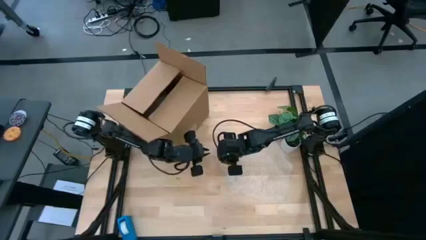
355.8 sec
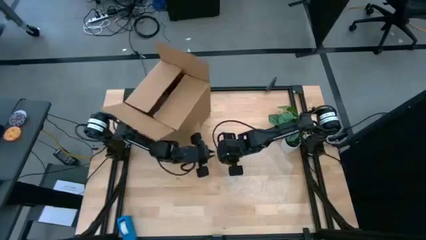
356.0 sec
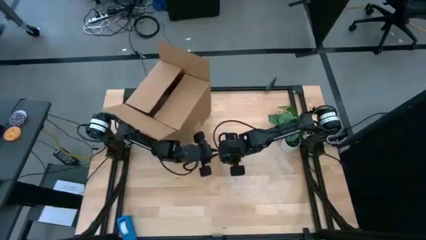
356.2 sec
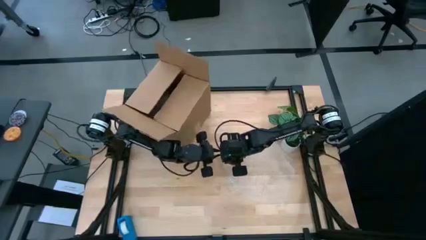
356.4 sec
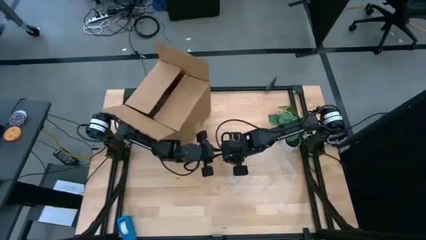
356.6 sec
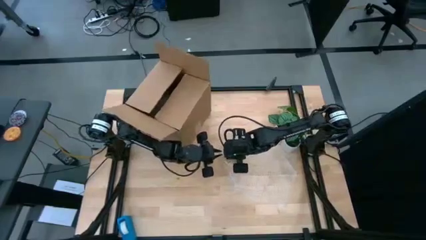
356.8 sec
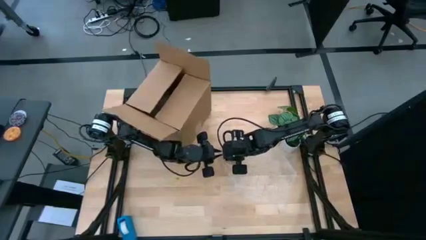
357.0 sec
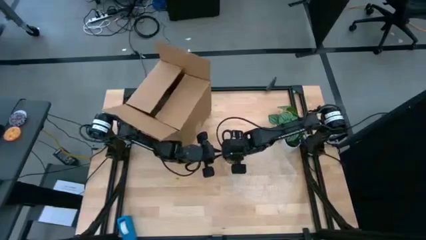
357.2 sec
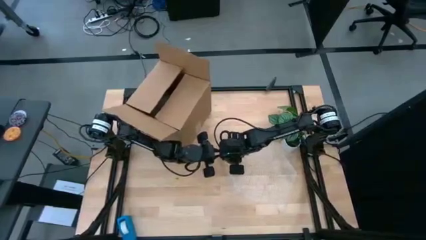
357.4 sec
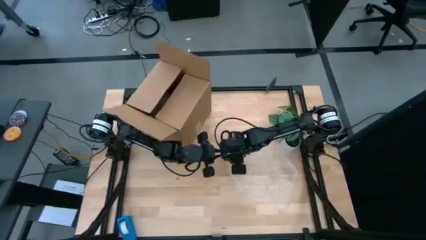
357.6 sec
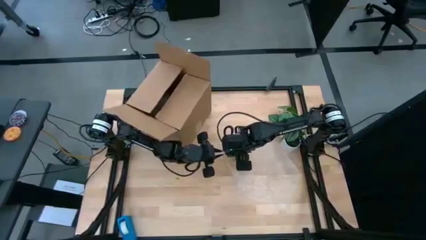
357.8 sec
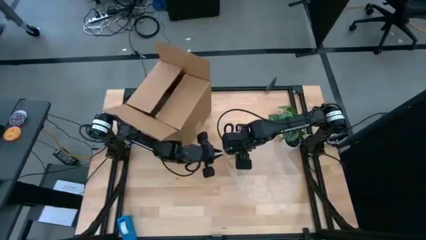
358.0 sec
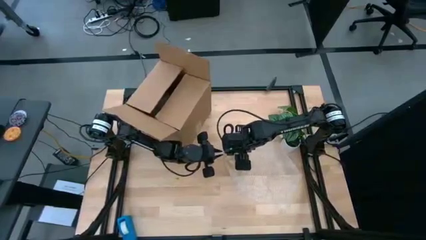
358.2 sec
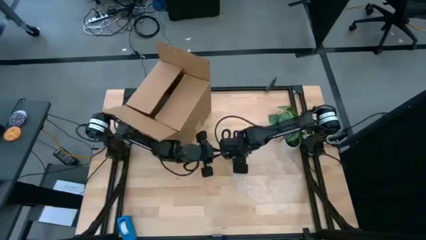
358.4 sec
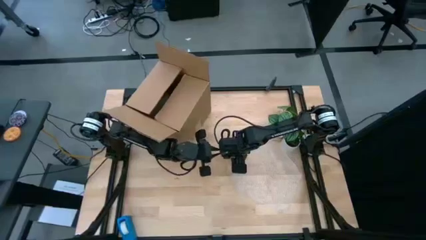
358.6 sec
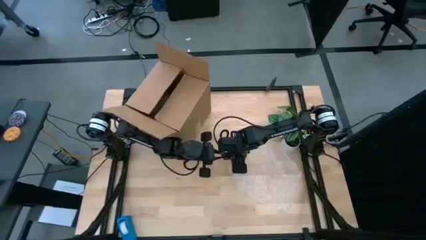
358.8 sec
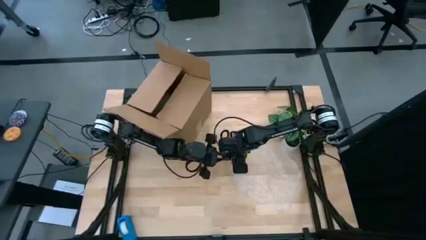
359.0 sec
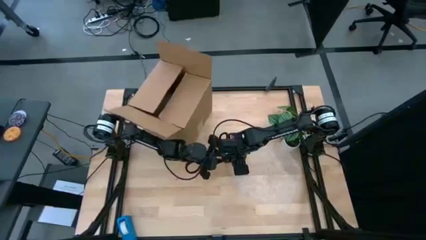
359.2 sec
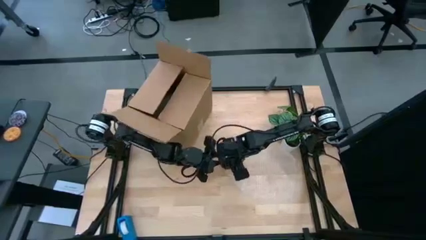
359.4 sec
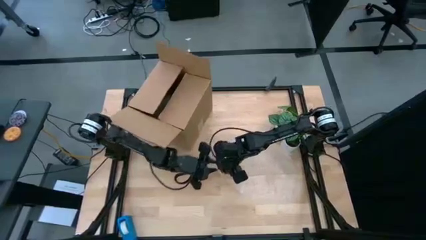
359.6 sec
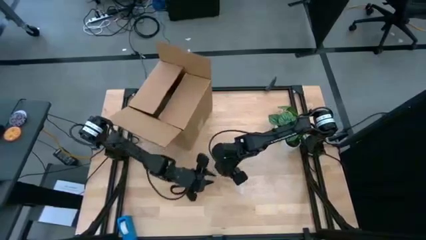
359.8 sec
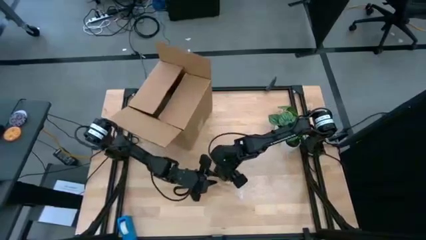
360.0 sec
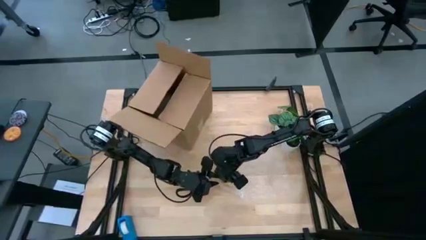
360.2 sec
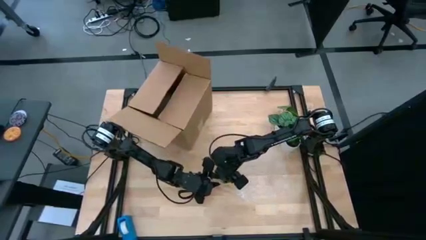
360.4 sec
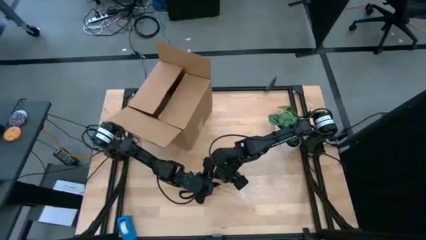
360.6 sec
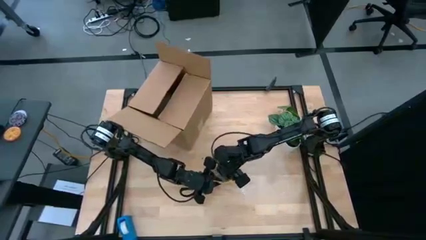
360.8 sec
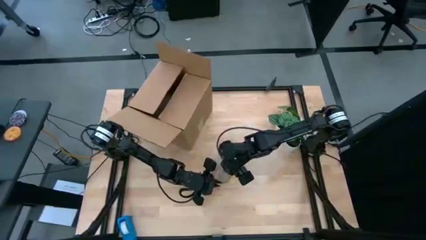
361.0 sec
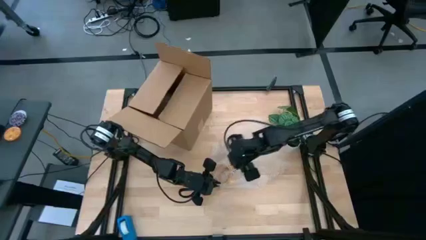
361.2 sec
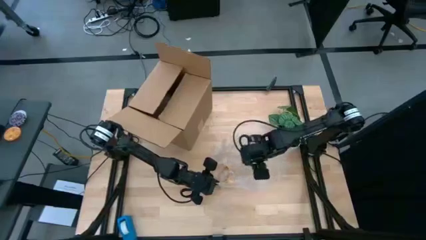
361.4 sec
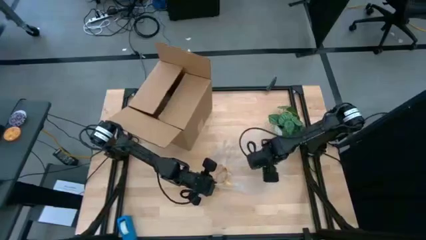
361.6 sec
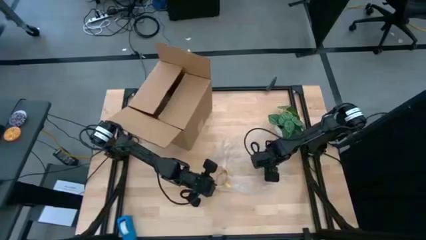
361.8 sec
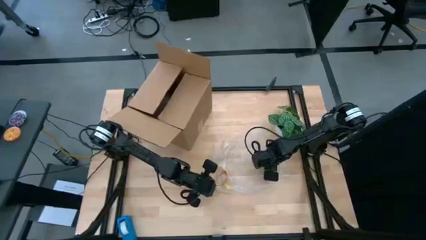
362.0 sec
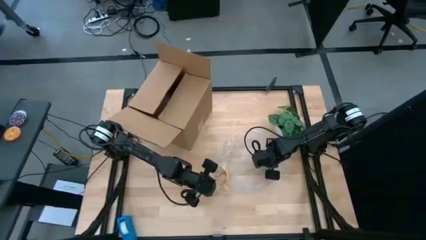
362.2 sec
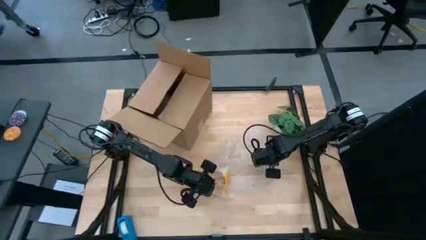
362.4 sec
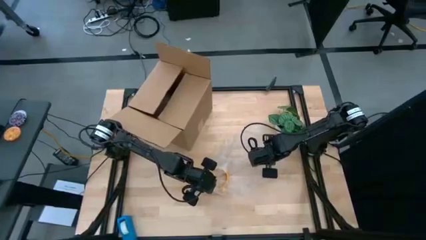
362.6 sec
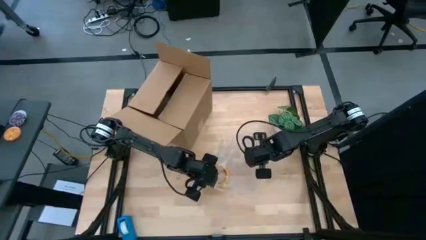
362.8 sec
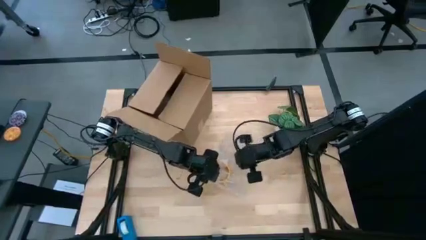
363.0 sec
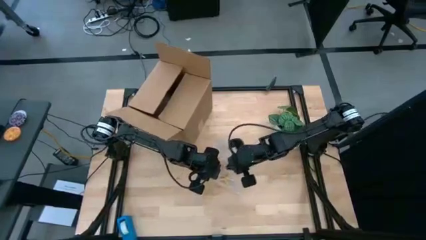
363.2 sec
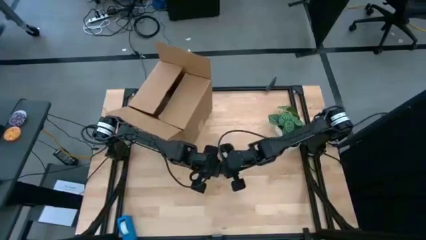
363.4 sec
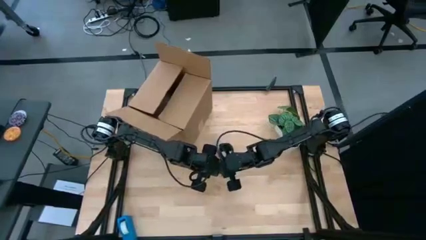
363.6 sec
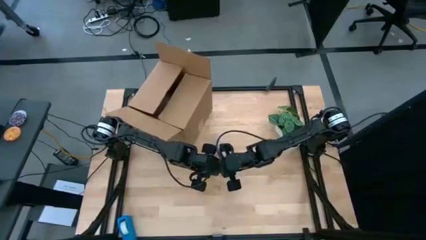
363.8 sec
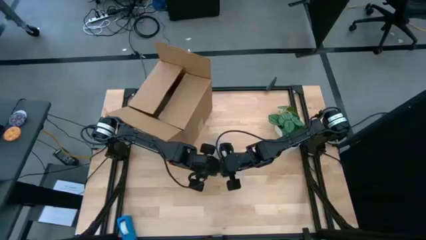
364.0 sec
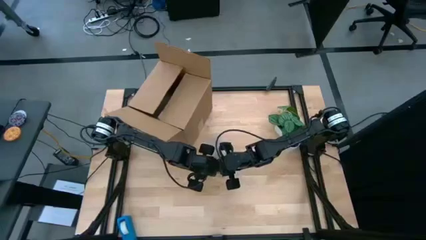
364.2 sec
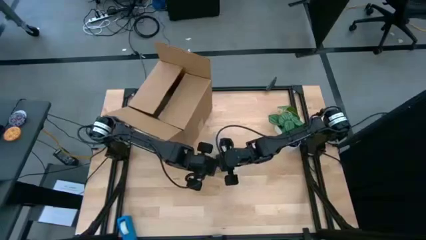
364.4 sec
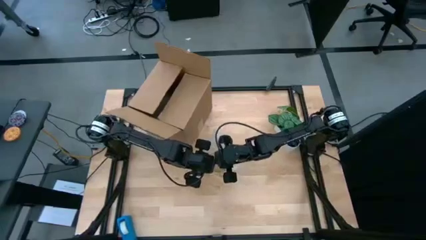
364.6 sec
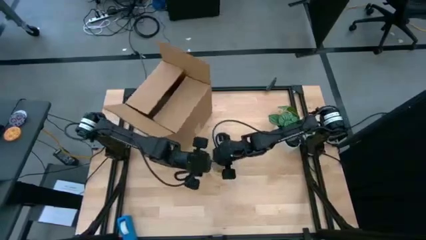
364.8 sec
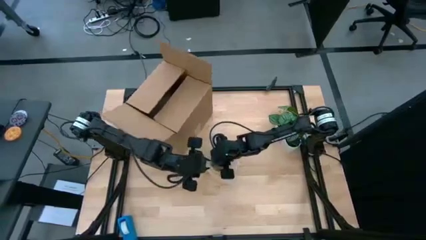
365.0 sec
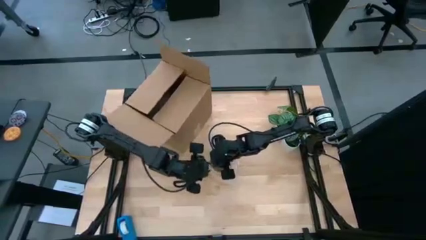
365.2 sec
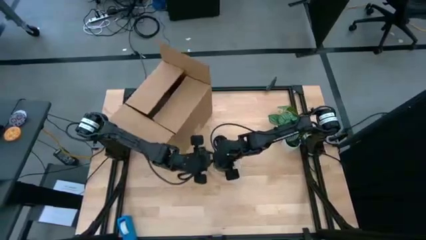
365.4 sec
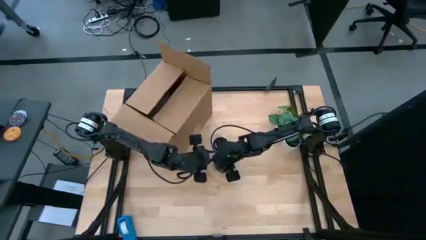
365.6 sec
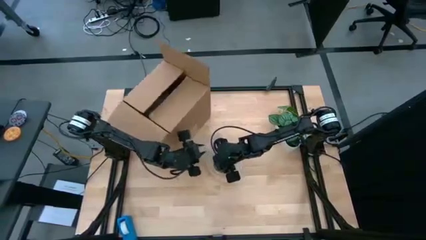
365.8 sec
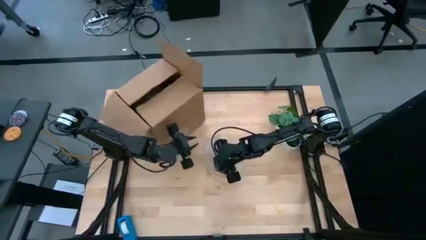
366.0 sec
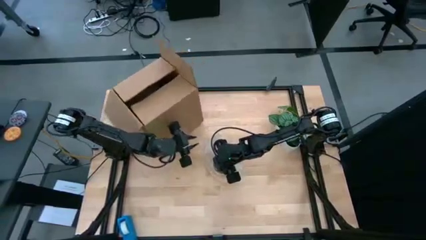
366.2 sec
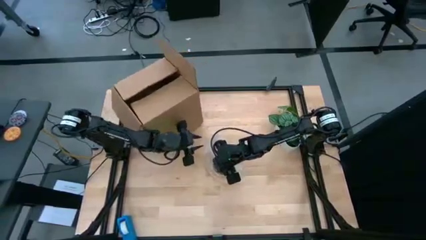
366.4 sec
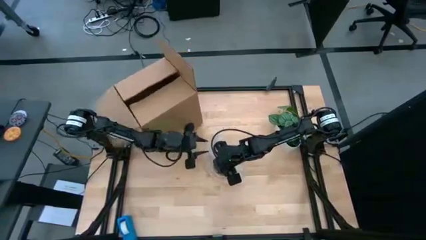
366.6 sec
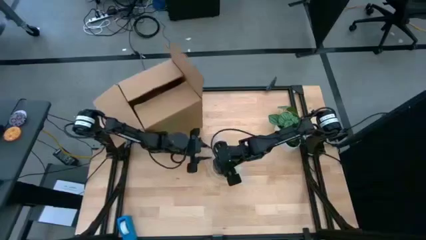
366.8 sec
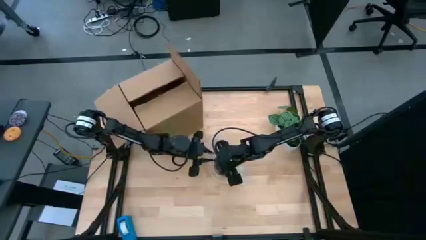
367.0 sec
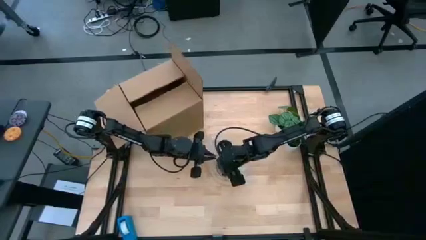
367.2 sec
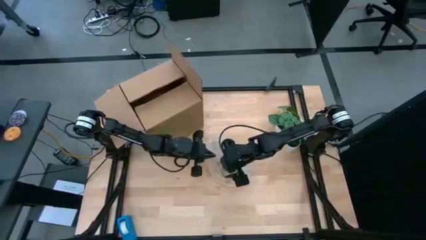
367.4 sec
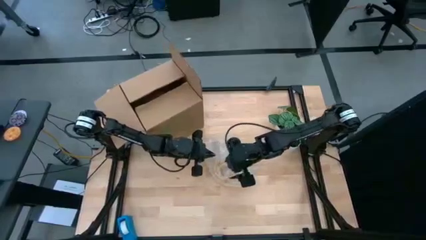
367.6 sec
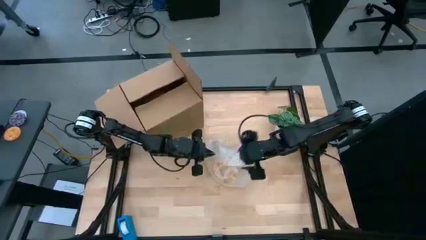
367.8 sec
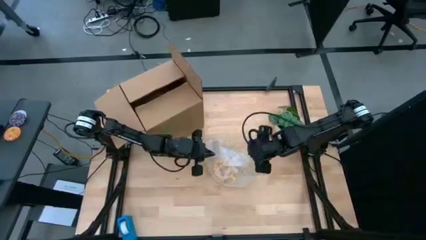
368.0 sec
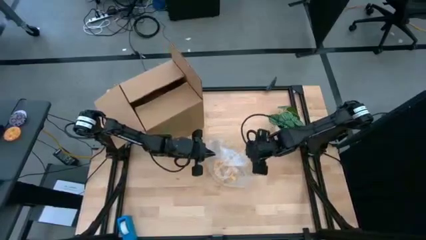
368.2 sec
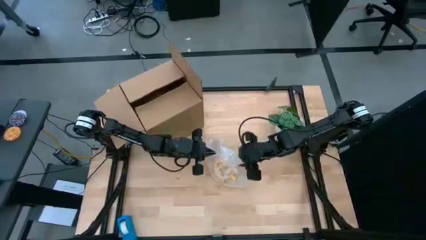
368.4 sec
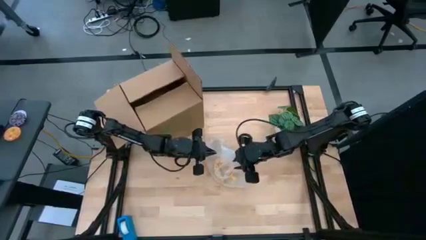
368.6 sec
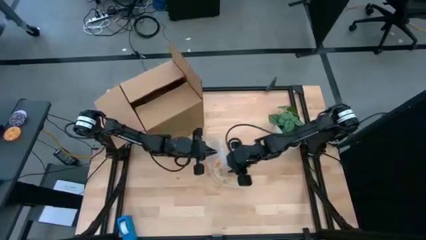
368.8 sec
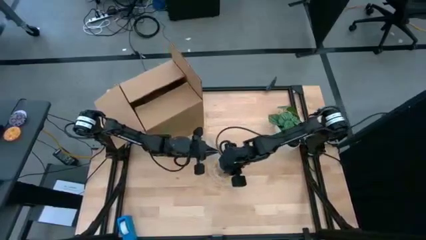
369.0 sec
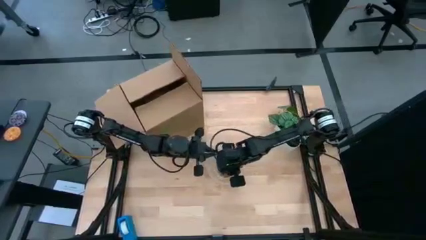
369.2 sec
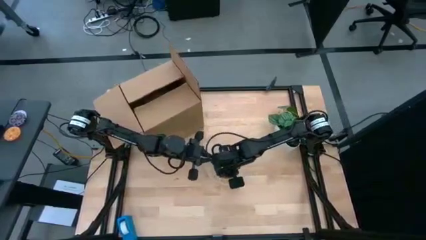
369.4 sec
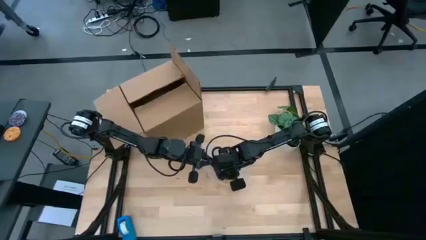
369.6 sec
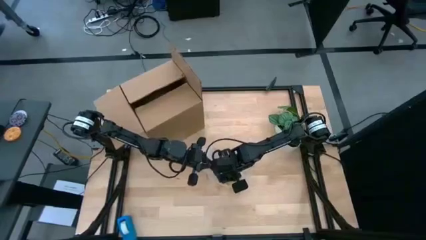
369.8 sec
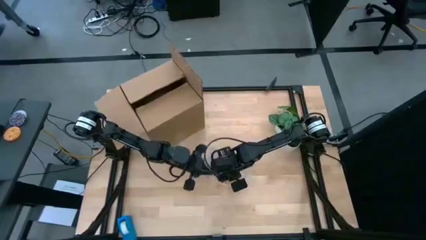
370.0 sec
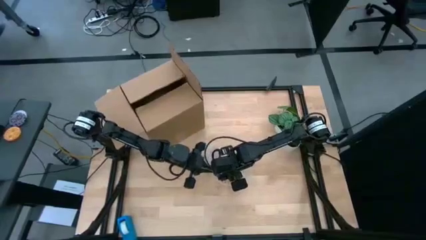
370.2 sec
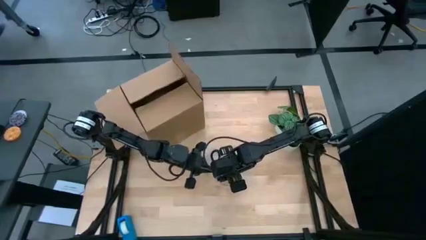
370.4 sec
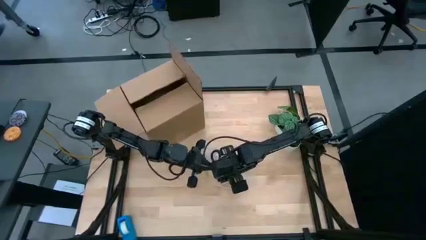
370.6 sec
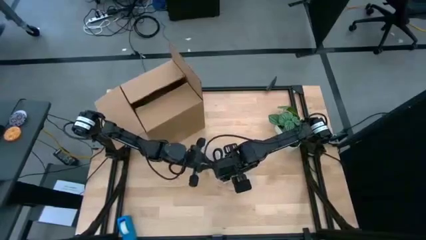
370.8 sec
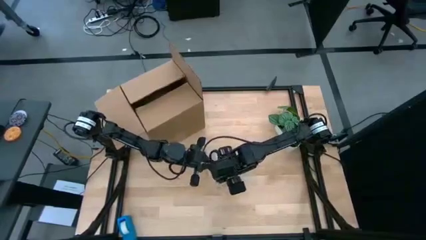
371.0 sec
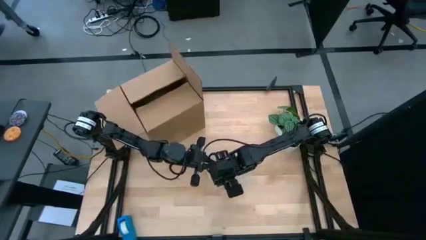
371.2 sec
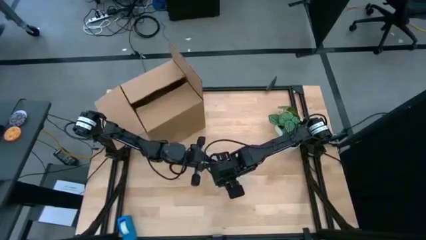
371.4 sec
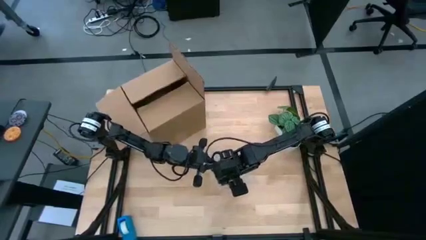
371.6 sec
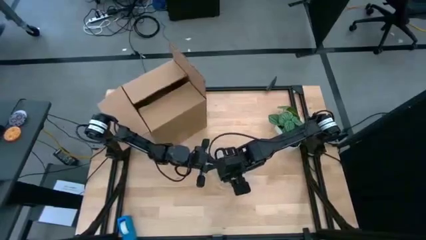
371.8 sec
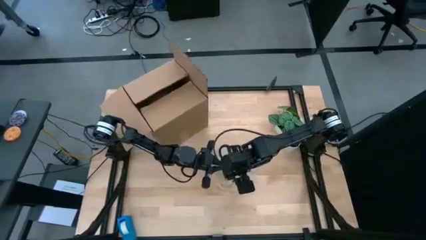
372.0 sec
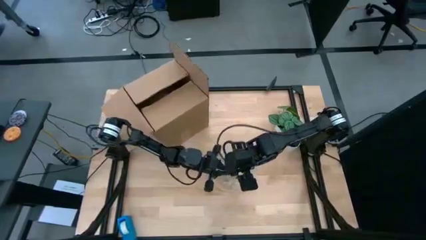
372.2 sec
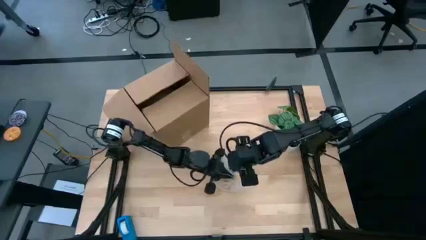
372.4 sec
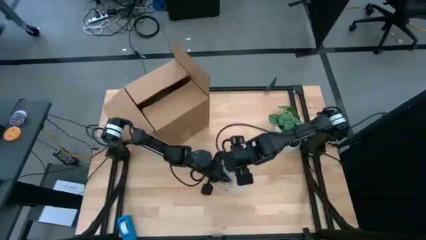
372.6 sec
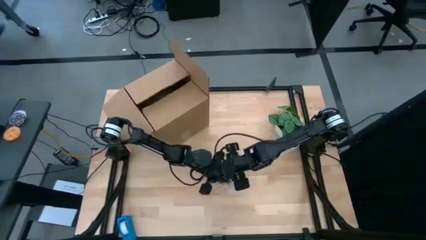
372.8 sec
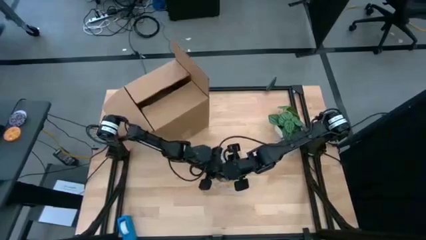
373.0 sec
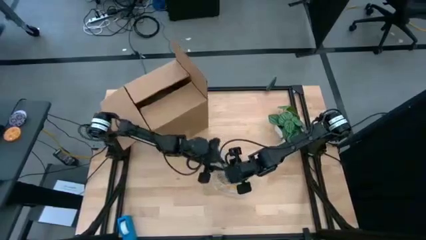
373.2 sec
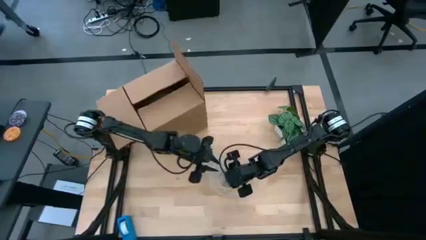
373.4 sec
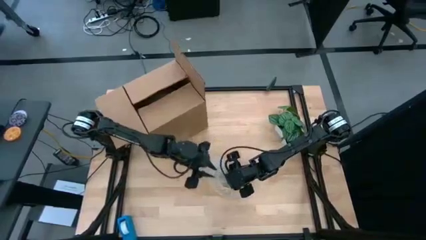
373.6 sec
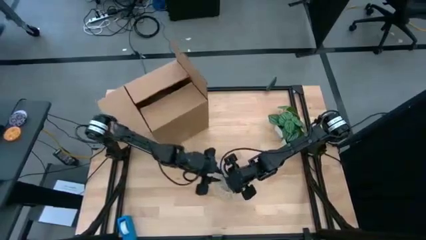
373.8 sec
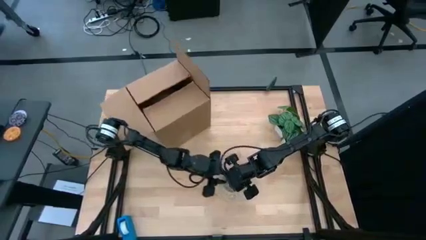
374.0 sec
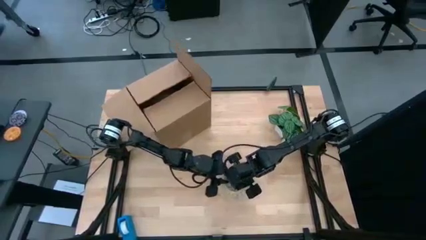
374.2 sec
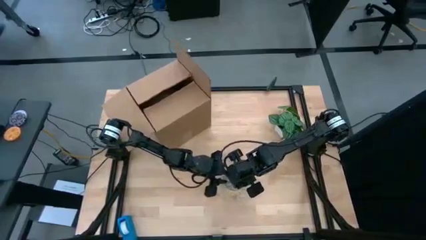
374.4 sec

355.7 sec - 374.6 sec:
Task: wrap mug
Wrap the yellow mug with the bubble wrap
